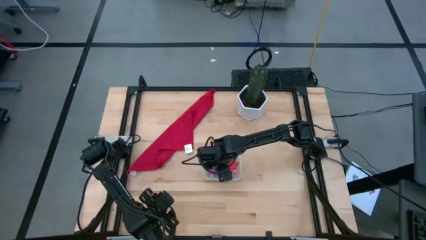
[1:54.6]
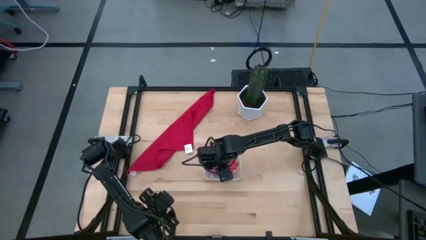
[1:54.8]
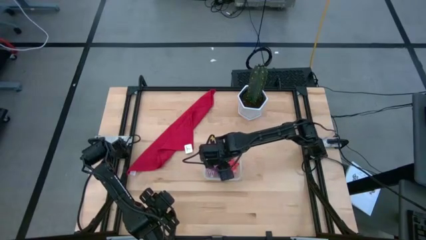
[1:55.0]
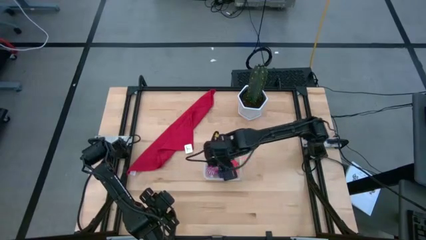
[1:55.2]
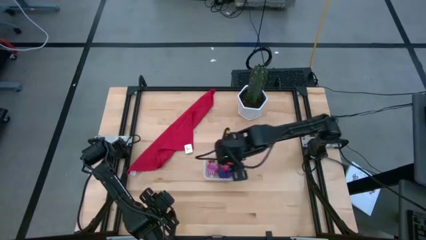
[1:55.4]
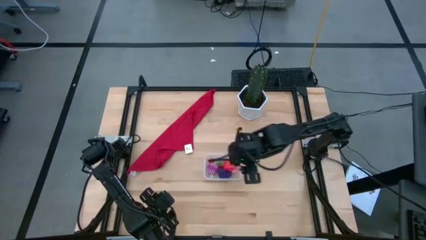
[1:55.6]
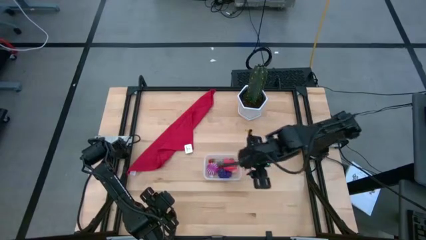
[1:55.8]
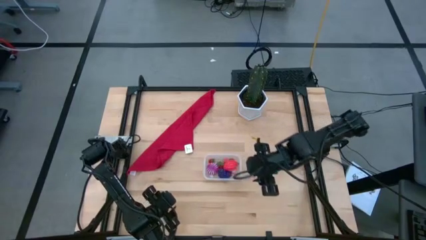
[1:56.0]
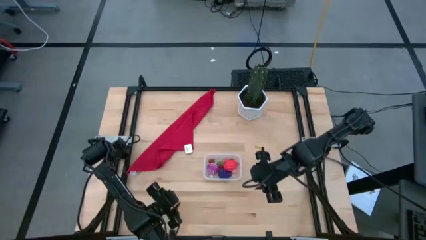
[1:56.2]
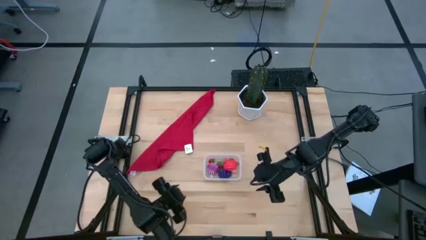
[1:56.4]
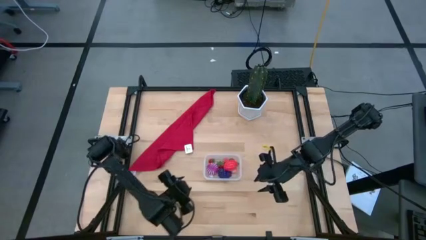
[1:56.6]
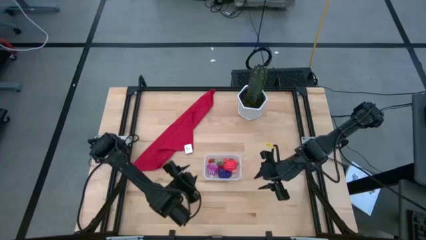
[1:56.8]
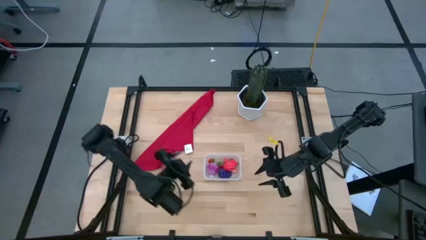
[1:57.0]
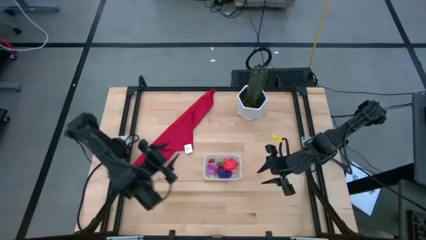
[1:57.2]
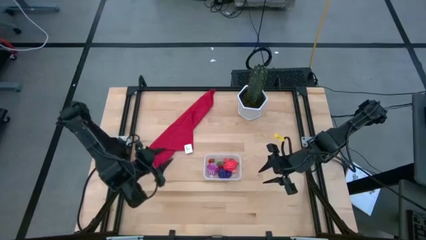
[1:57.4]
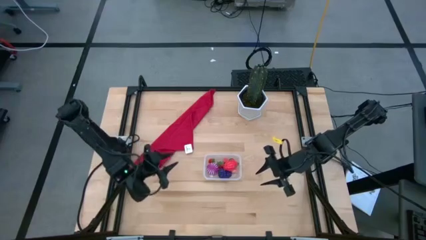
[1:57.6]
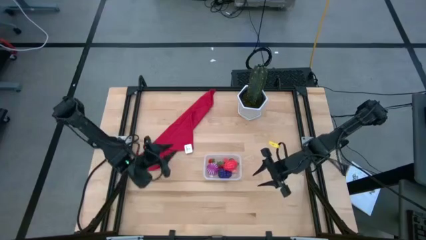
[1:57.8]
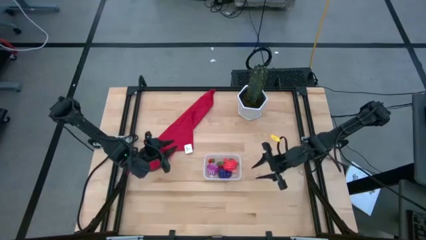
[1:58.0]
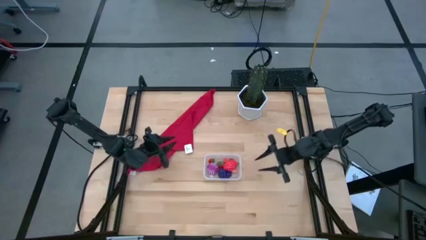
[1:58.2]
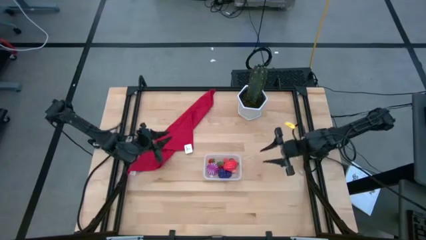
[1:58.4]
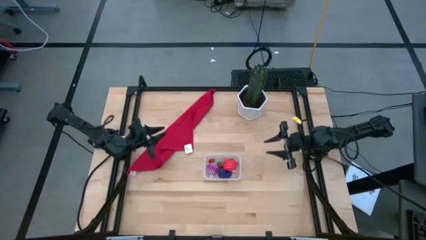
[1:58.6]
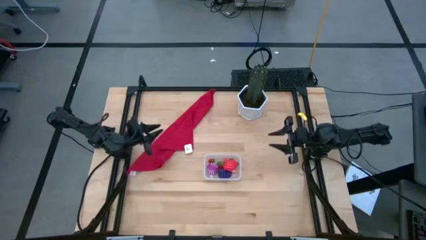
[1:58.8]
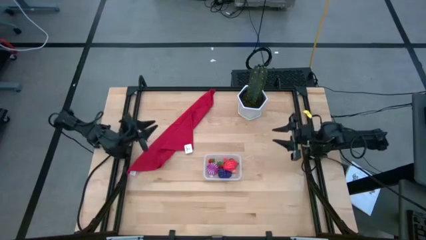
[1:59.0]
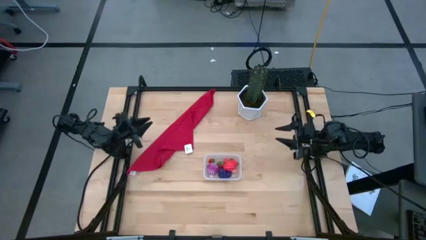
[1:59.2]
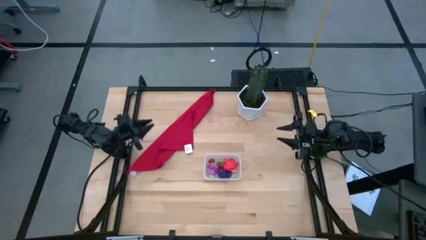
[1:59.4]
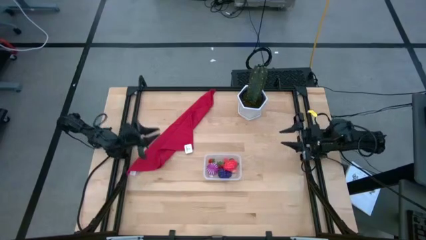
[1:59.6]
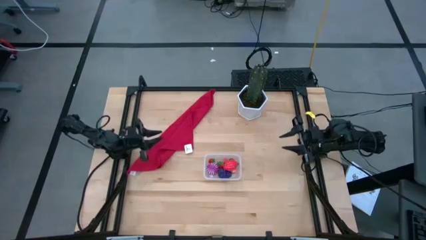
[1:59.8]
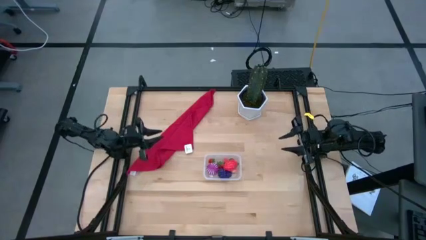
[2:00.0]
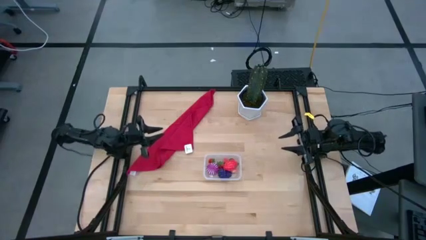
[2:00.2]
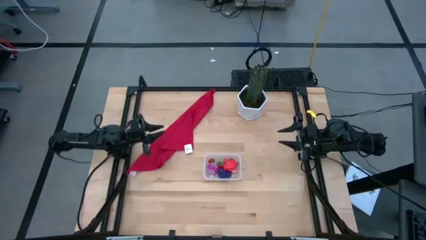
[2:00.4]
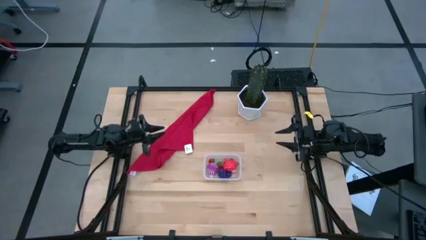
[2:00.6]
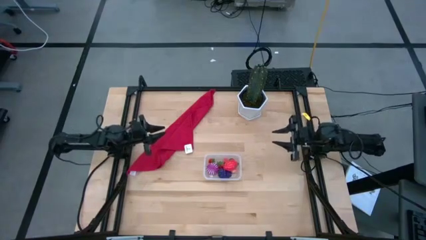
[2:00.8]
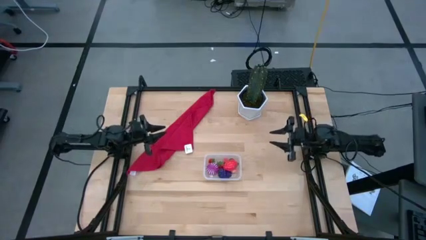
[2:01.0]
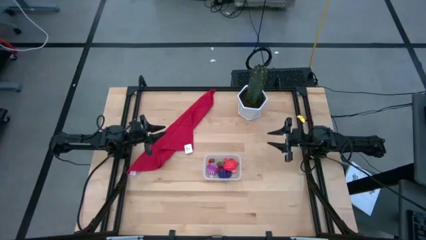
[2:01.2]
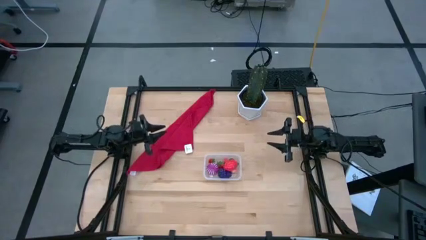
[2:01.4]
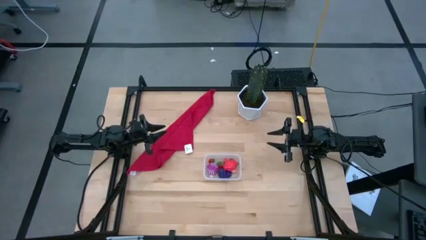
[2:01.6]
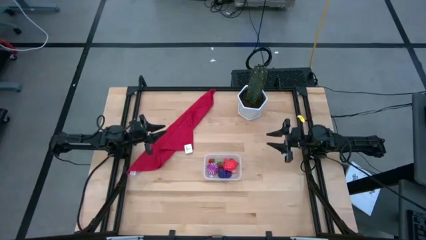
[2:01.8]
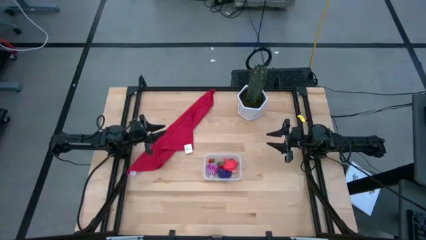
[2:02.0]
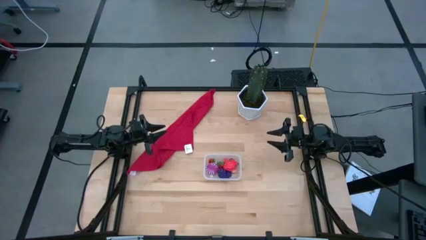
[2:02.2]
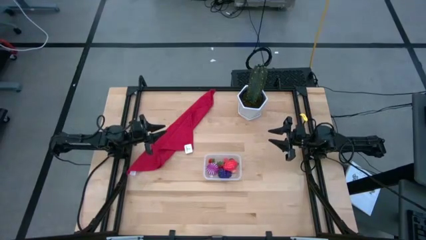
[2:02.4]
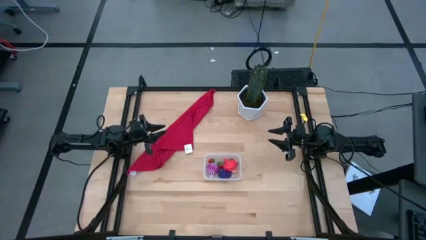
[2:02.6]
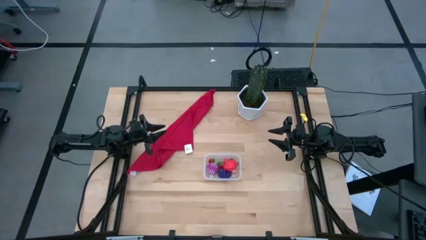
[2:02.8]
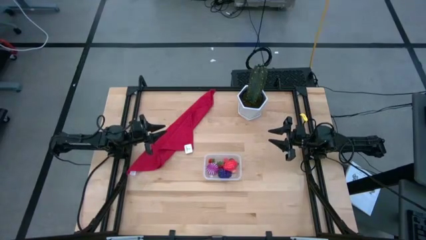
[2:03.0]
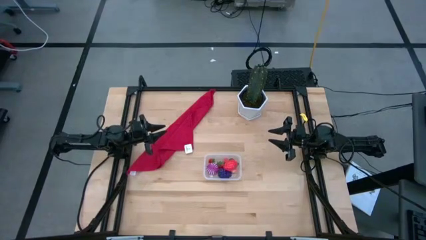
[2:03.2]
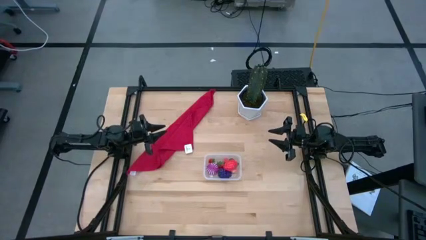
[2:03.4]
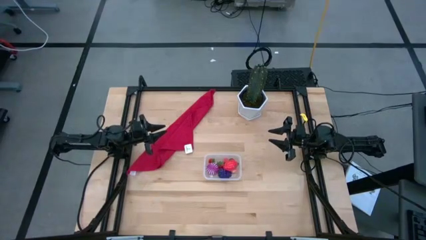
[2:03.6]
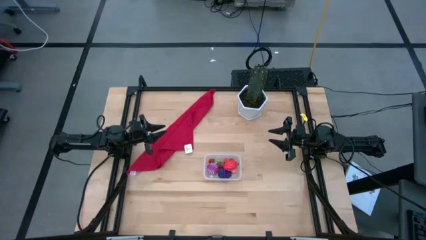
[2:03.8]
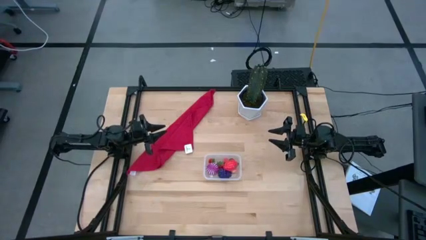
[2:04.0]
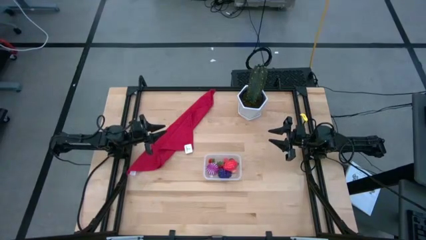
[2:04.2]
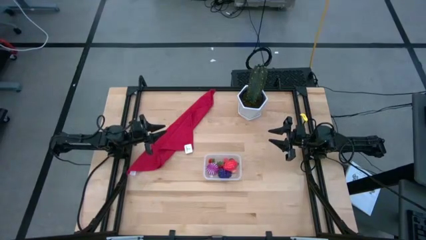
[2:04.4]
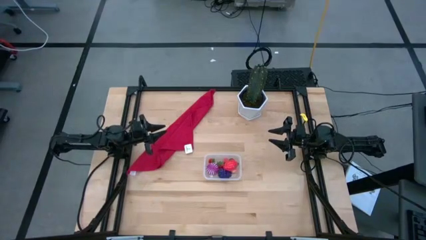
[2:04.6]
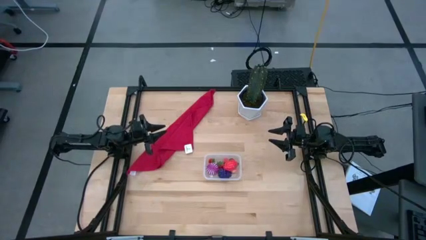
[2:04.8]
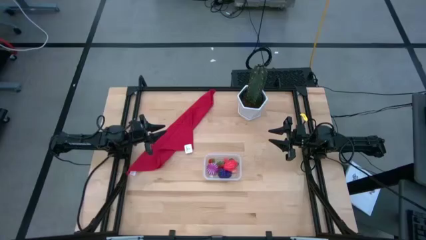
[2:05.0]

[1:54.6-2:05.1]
Task: Pick and placing Produce into tupperware
Return to Home Position

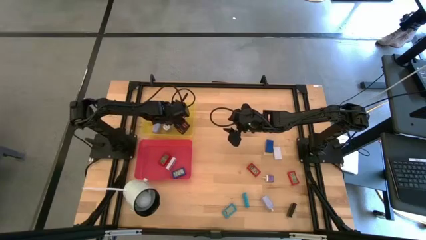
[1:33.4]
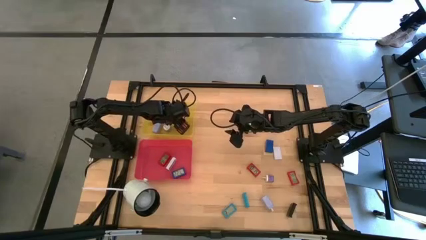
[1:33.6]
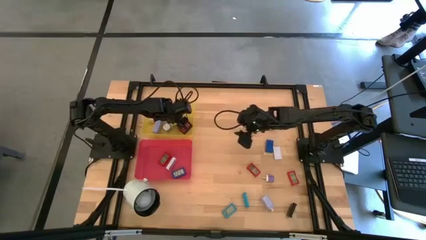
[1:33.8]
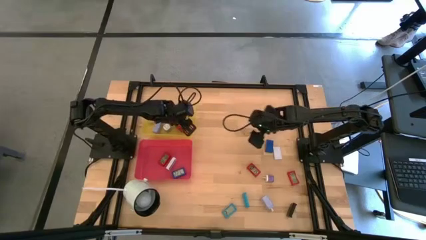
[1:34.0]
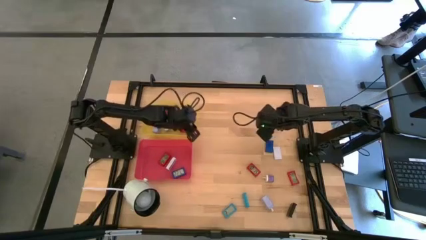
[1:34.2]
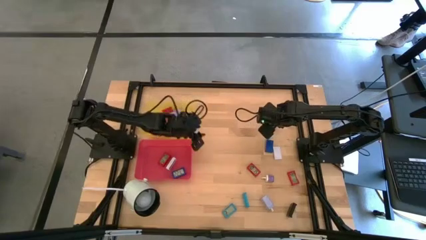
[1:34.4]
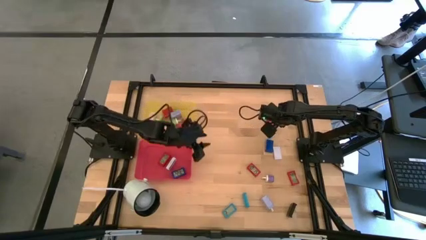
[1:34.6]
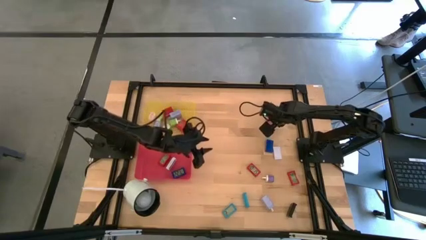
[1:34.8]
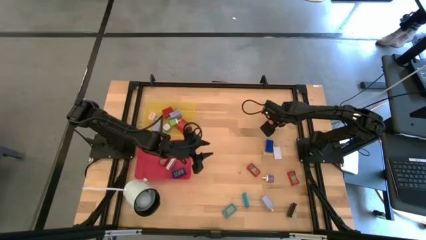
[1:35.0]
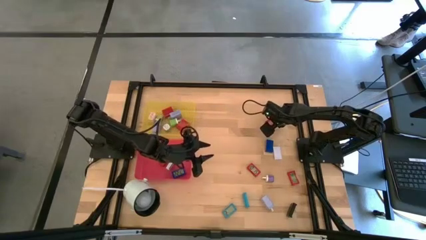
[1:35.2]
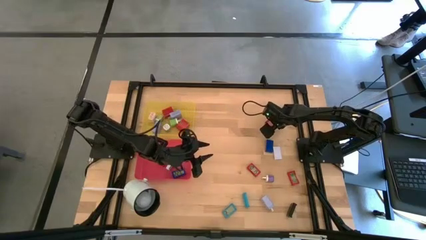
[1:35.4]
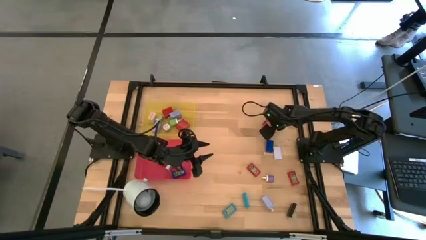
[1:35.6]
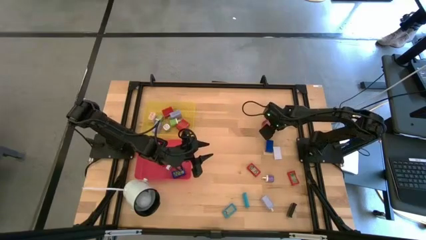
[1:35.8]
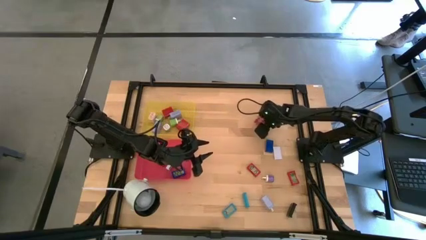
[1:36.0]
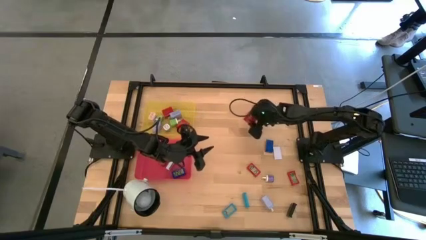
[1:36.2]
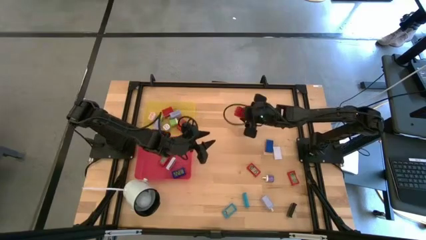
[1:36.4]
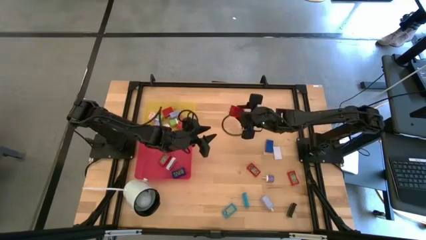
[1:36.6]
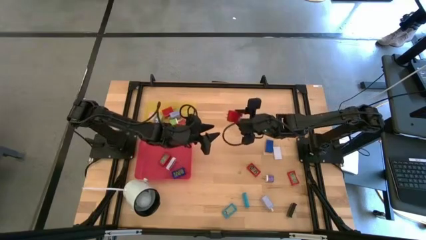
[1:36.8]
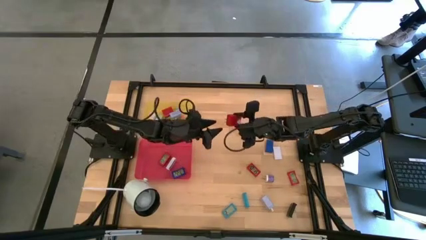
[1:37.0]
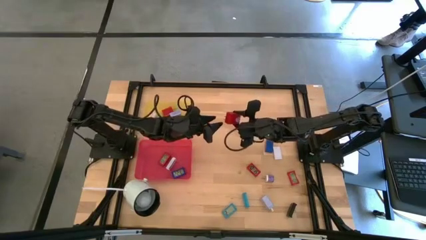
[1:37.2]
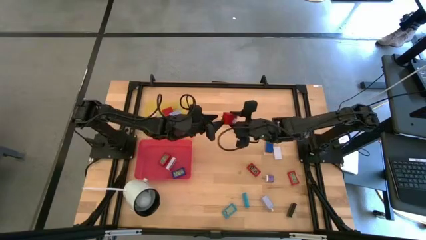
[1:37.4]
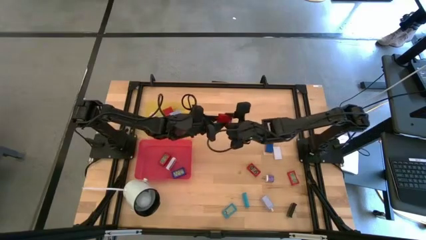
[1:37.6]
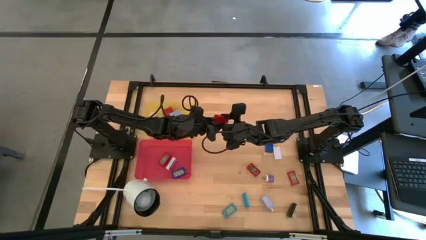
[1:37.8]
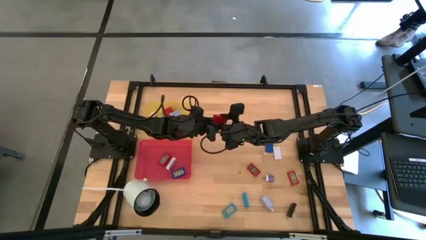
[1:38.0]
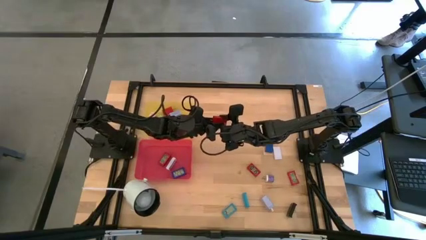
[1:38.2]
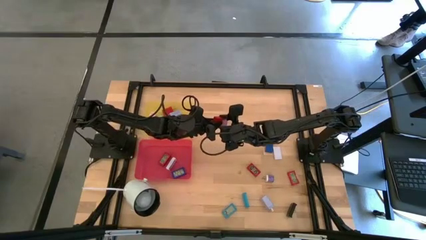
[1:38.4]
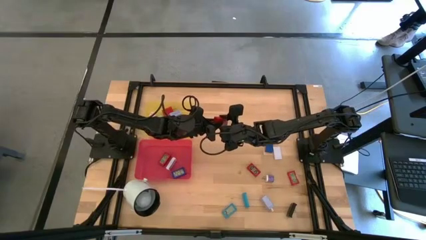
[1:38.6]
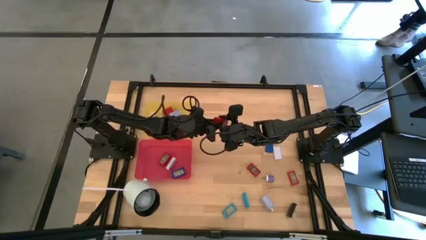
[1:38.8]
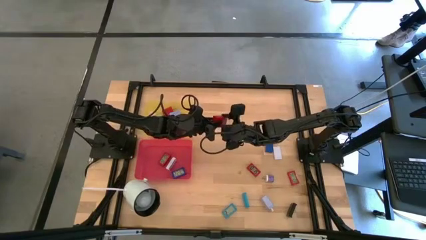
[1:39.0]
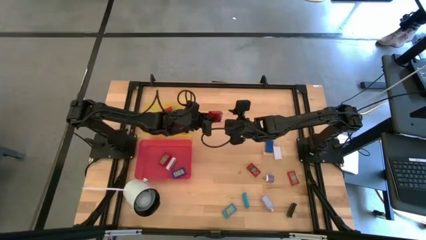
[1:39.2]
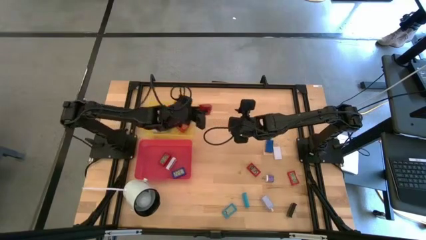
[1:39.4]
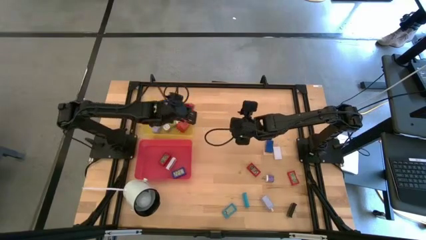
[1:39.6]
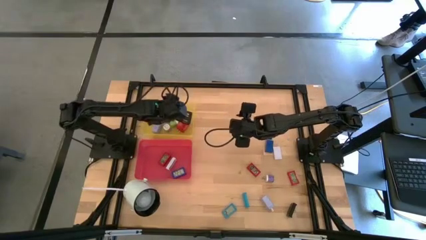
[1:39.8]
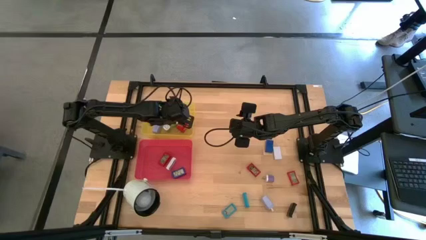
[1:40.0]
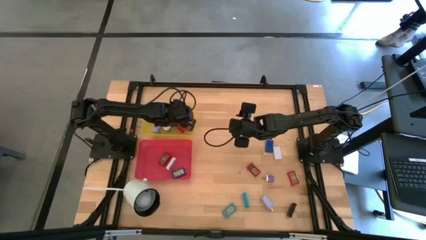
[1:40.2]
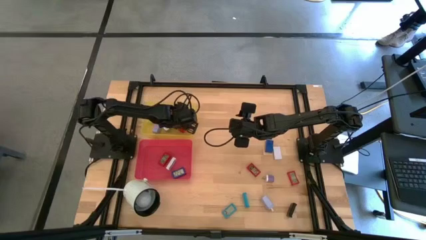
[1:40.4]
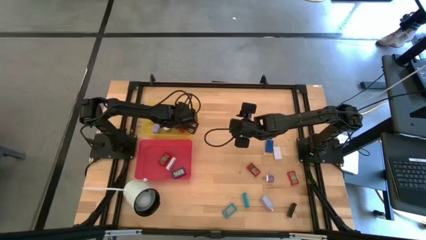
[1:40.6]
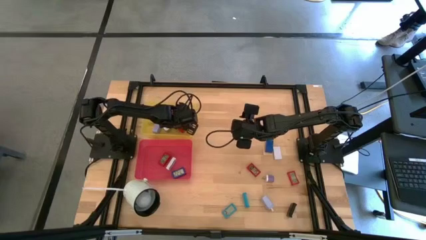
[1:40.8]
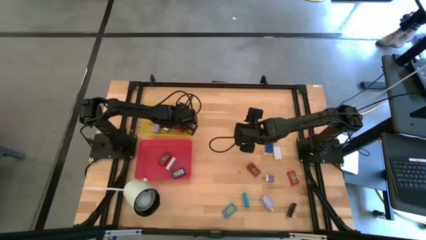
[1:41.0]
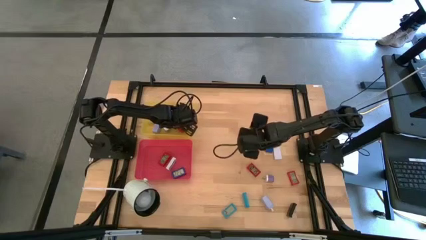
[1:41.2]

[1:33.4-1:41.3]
Task: Pick & Place Office items
Put the red charger adapter into the yellow bin
